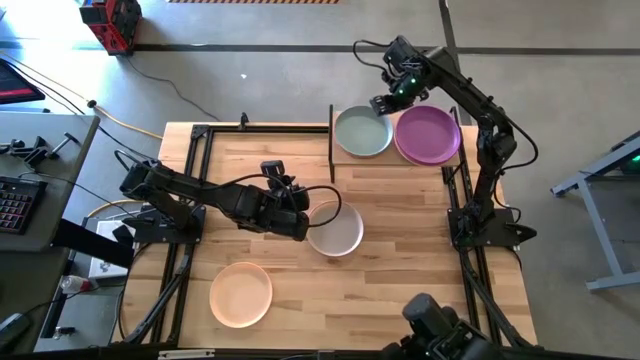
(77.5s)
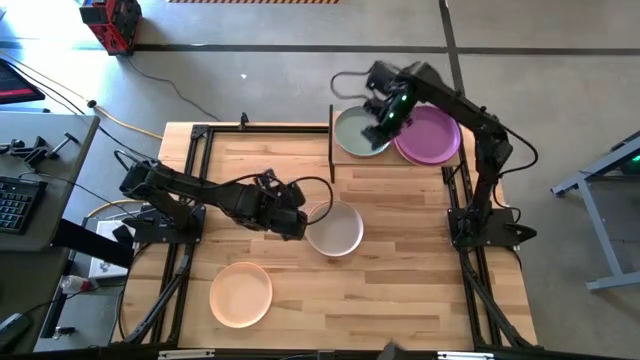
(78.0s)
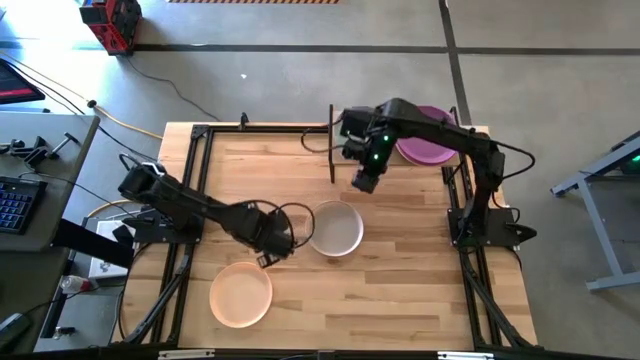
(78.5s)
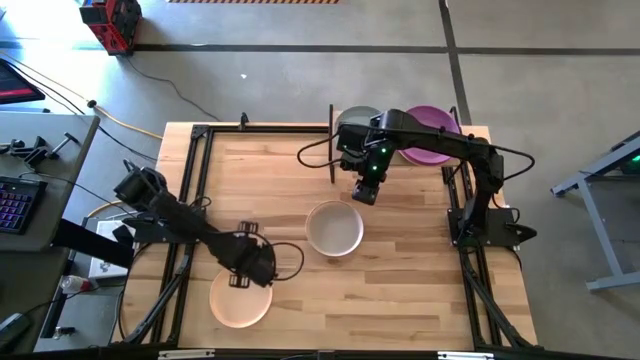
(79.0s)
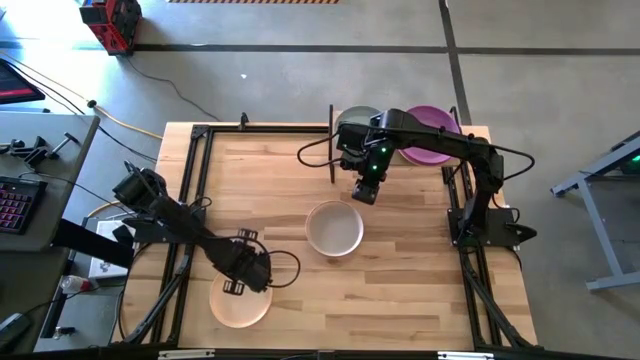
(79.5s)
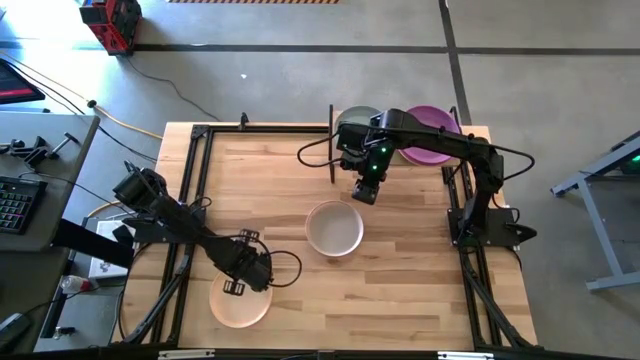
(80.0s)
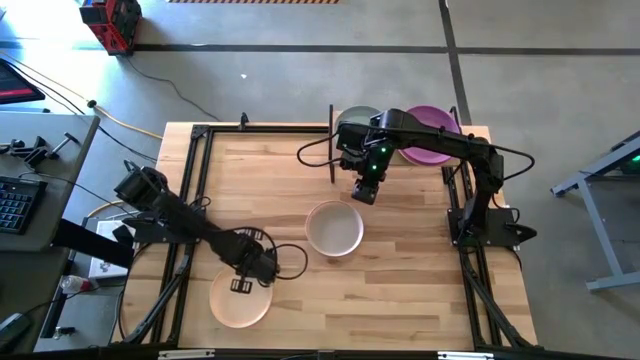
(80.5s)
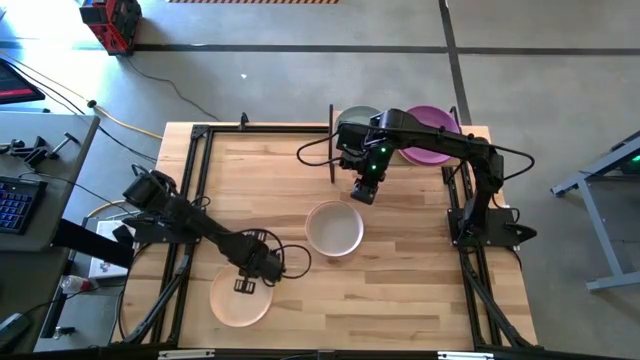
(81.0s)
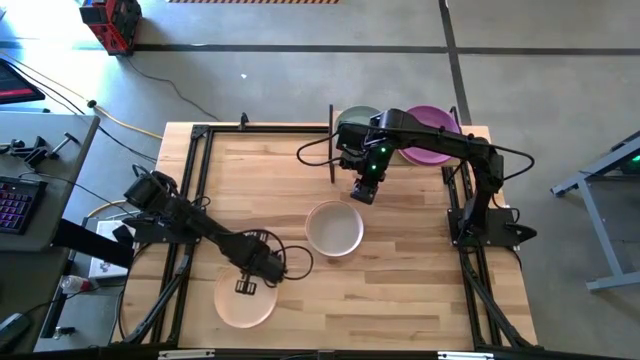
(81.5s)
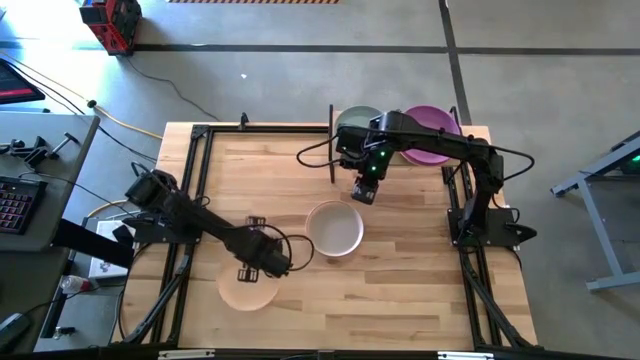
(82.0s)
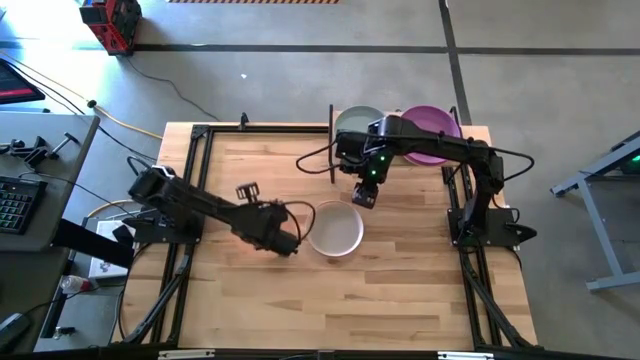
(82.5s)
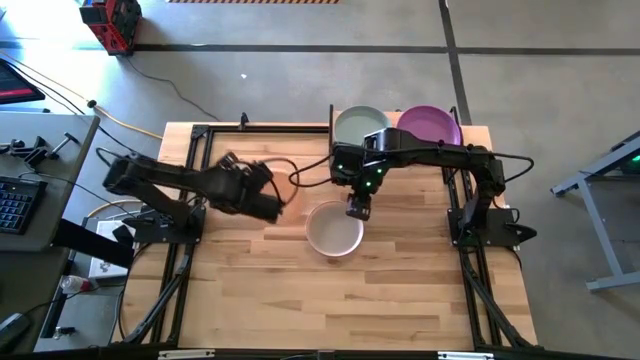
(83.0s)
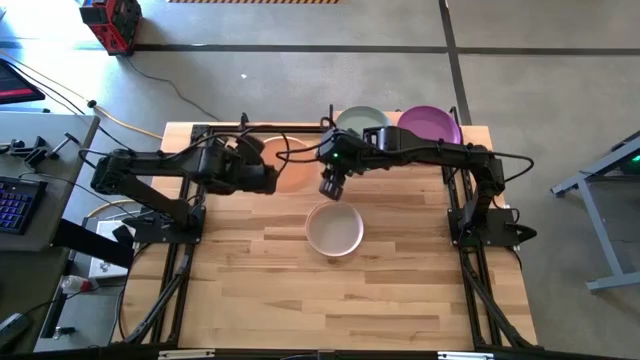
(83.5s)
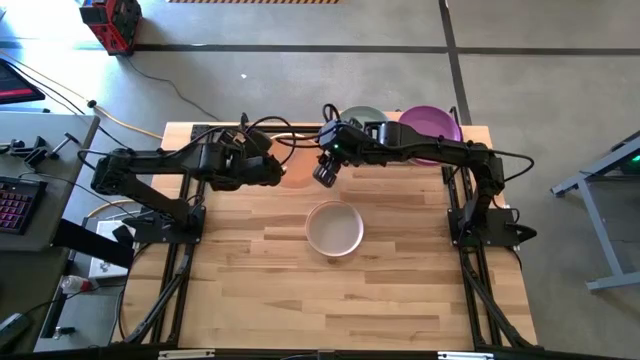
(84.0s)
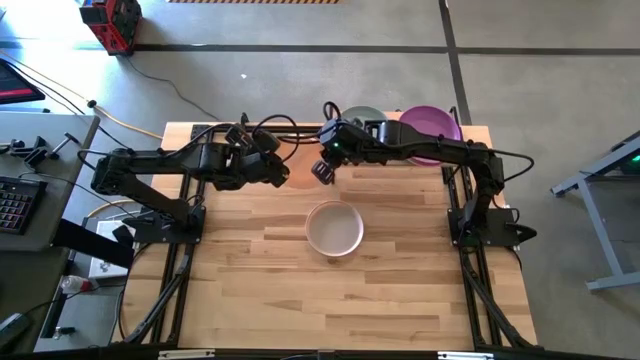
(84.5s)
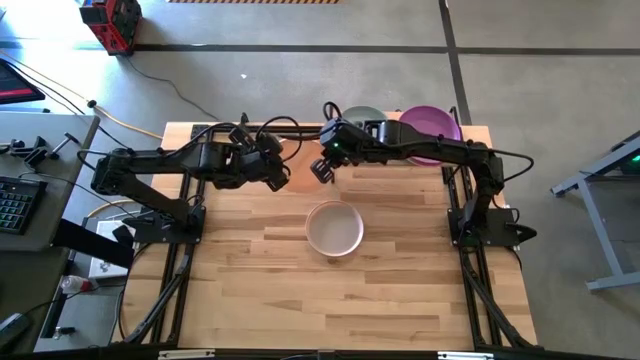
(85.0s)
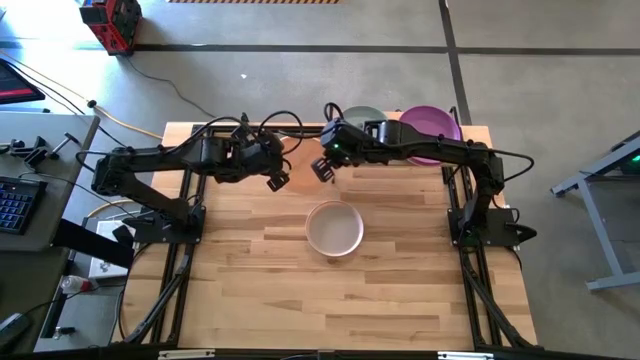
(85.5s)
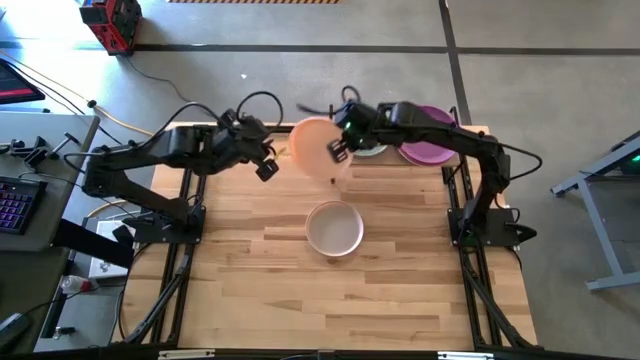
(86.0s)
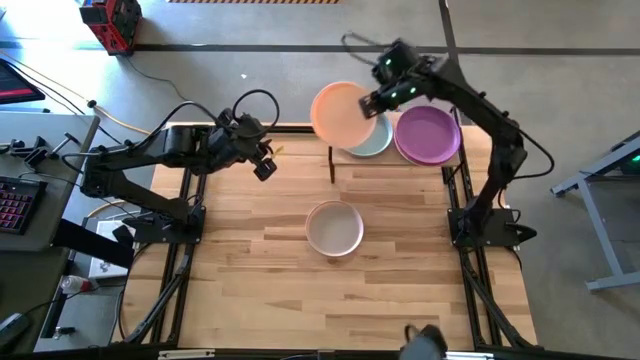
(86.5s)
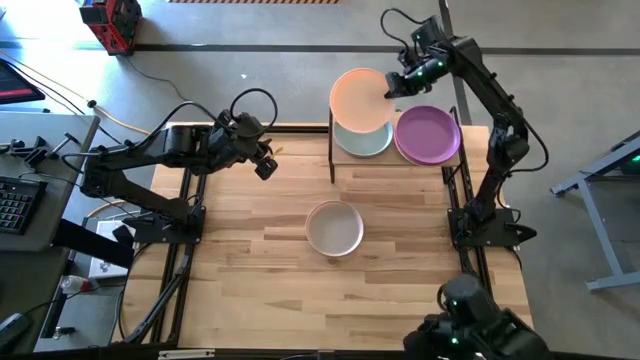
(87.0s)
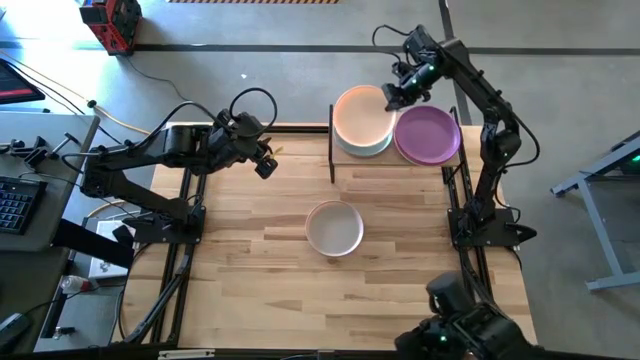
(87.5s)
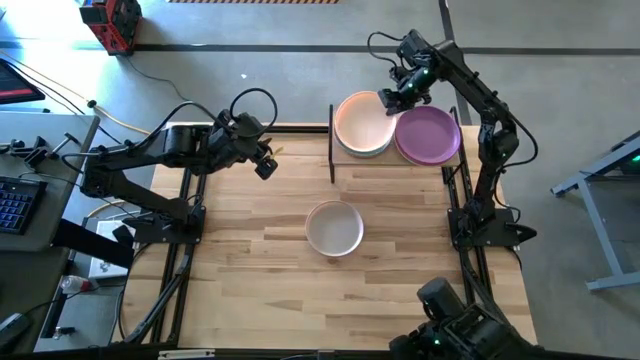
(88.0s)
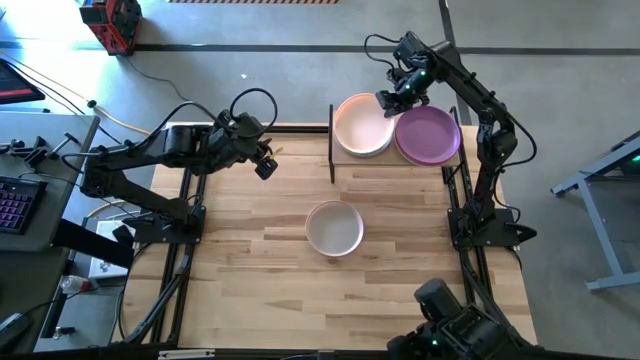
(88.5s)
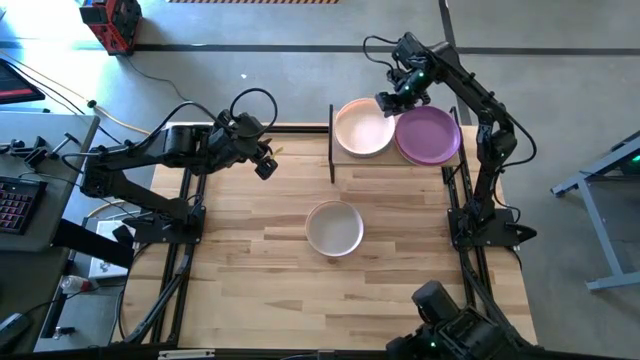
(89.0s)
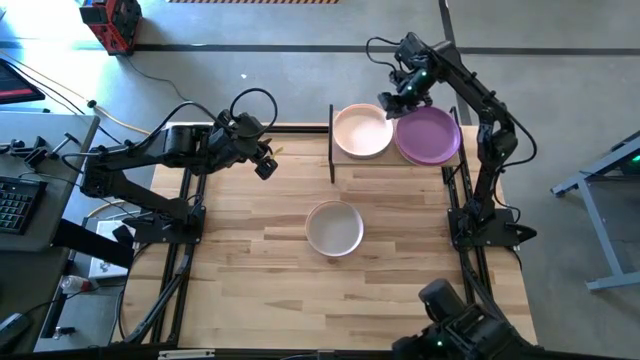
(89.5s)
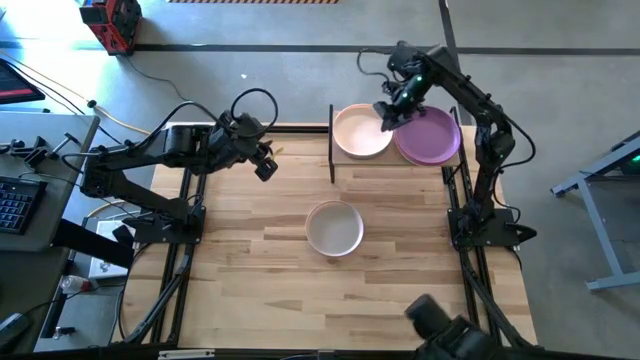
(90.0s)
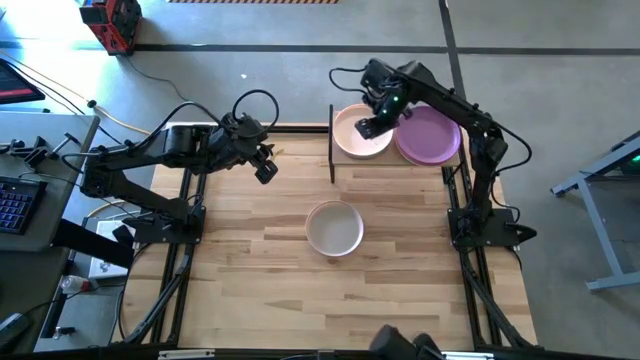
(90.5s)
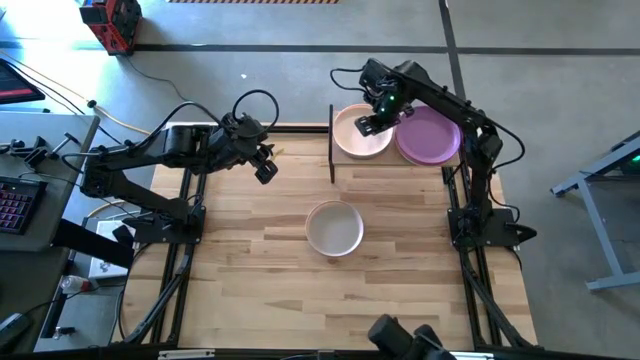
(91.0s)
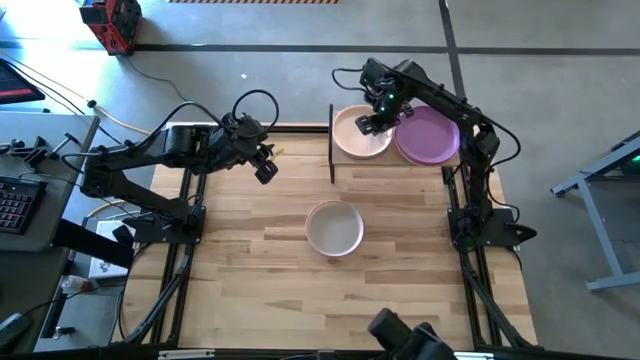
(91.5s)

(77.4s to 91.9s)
Task: Place and stack plates onto a shelf
Stack the light orange plate on top of the blue plate on the shelf

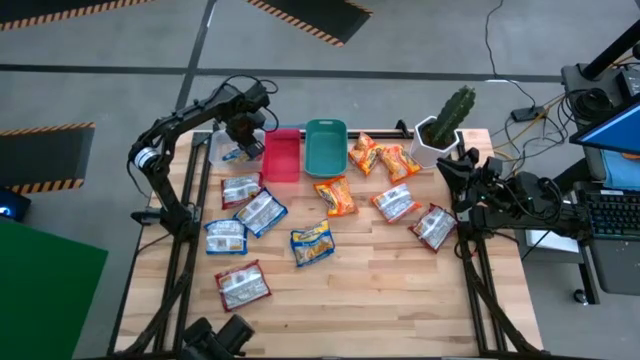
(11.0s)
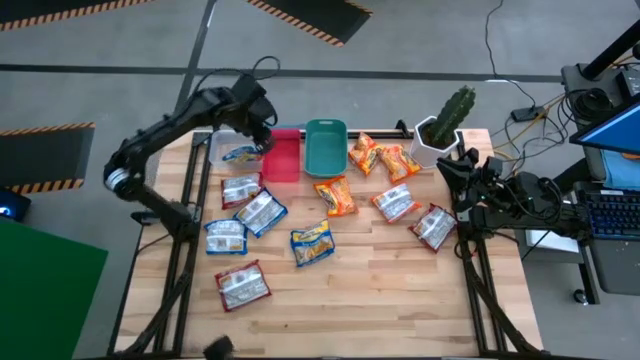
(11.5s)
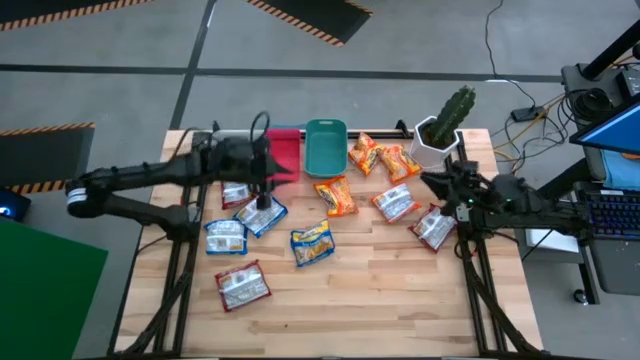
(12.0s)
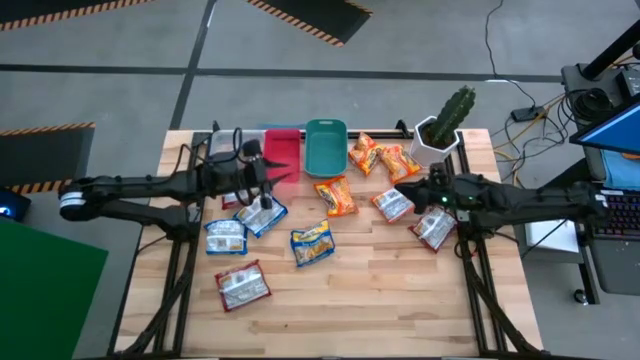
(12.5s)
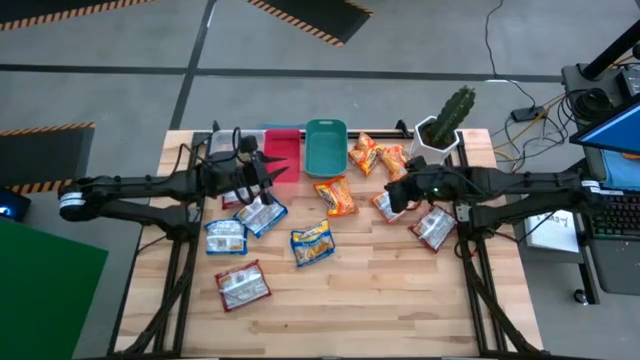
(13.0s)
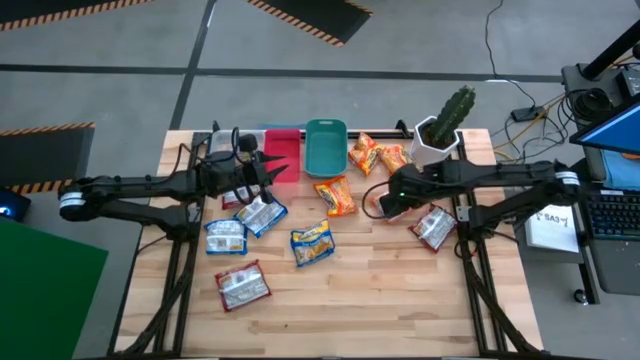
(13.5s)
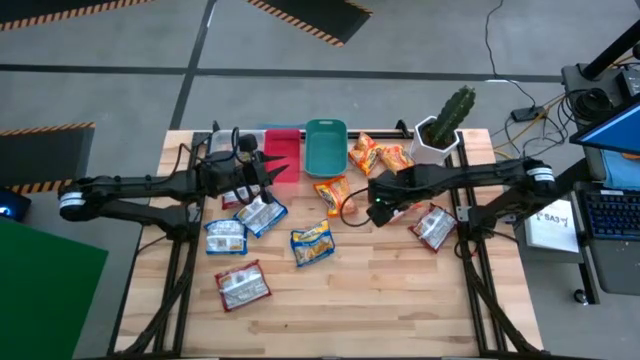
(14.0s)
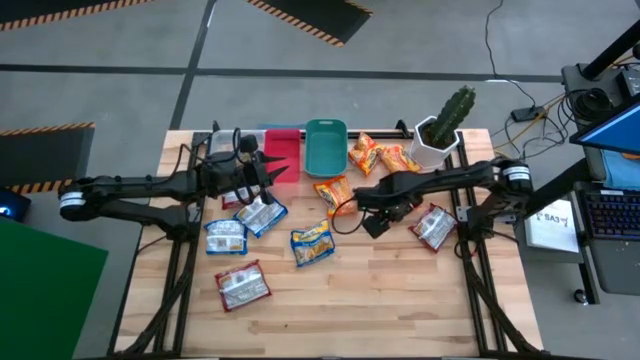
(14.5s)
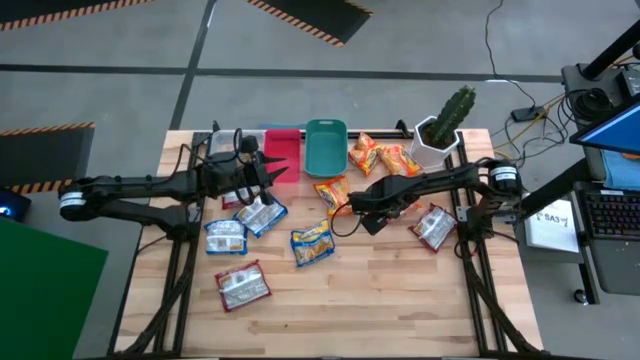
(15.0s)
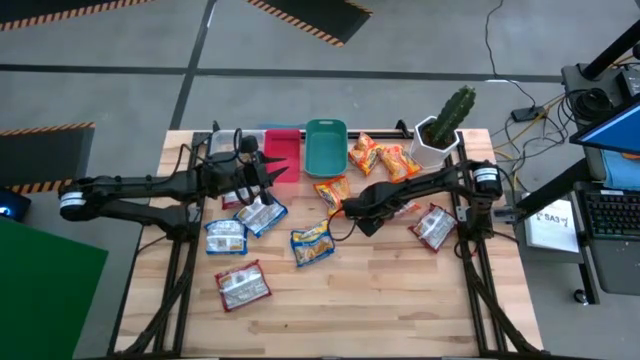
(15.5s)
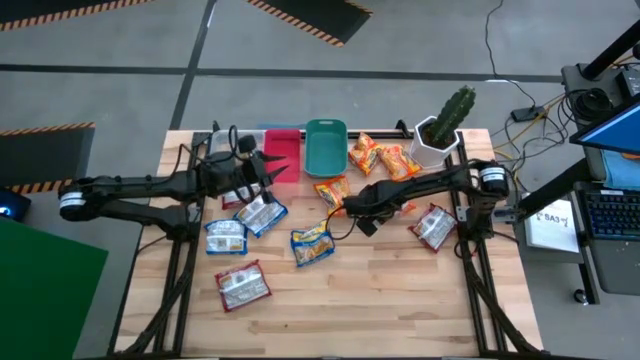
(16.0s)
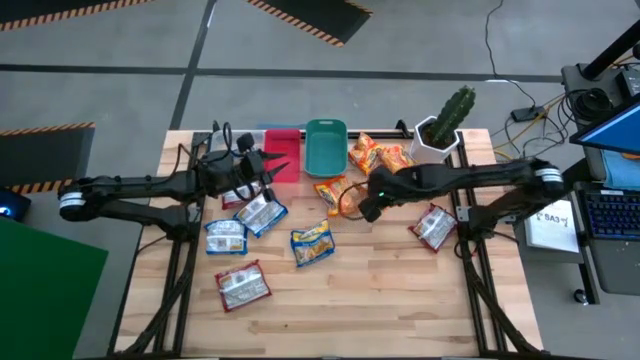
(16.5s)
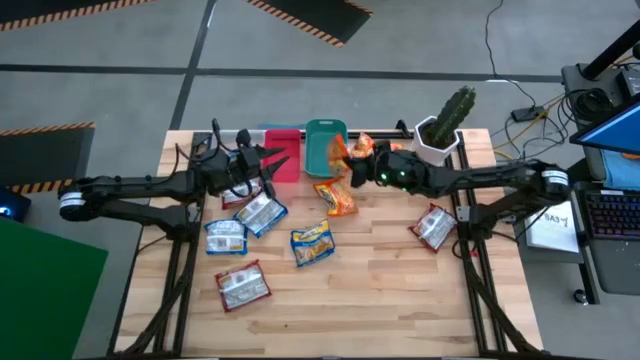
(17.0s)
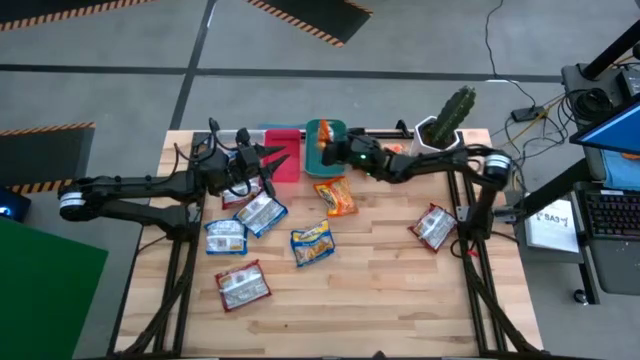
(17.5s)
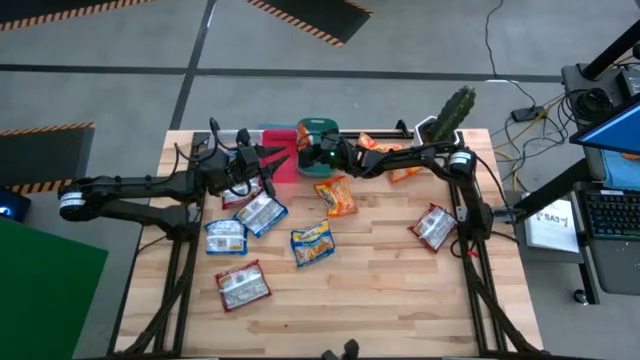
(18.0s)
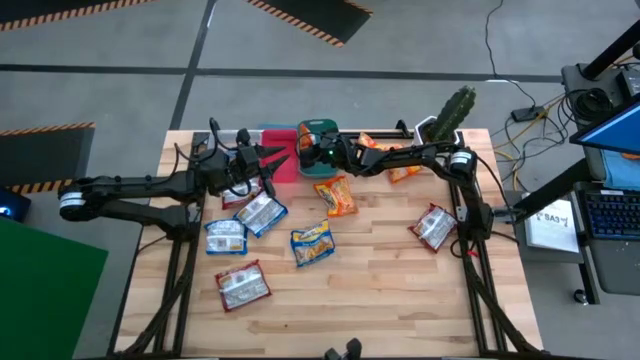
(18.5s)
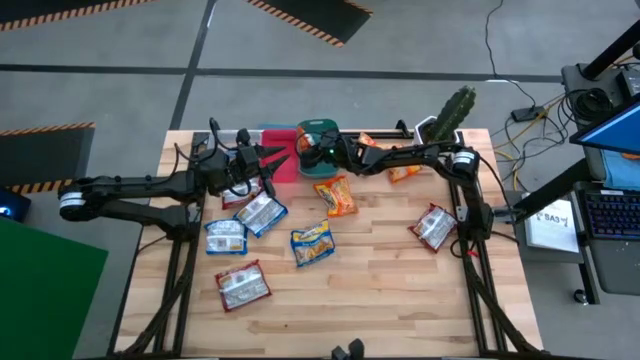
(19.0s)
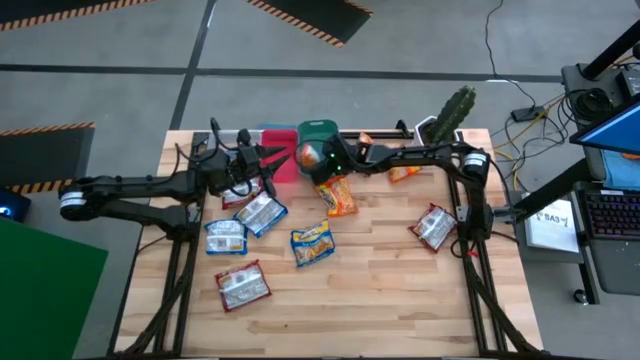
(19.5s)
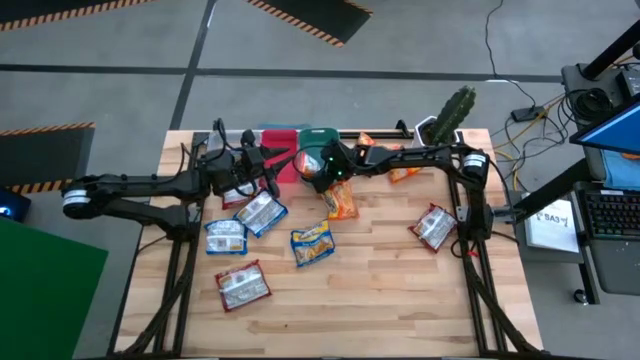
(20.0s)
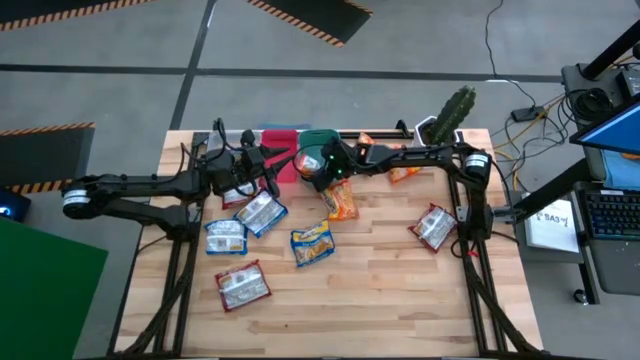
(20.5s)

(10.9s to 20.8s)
Task: Sort Maruchan noodles
Put the orange noodle pack into the green bin
